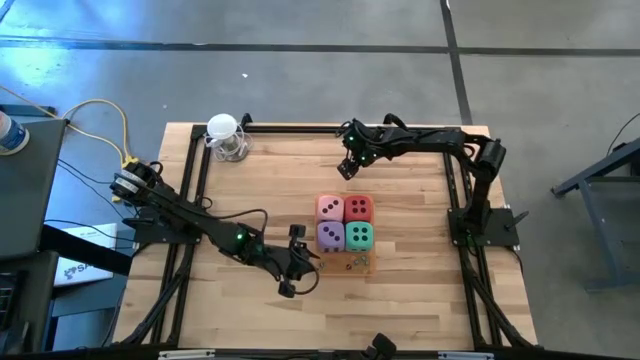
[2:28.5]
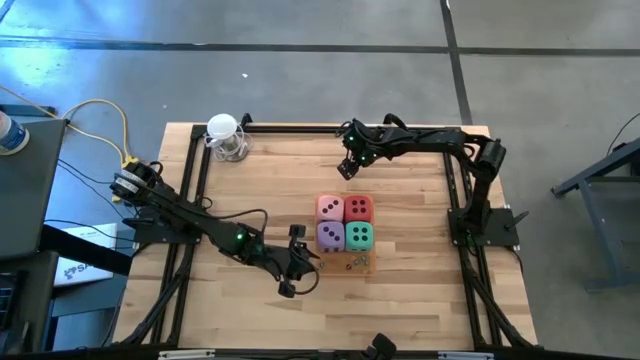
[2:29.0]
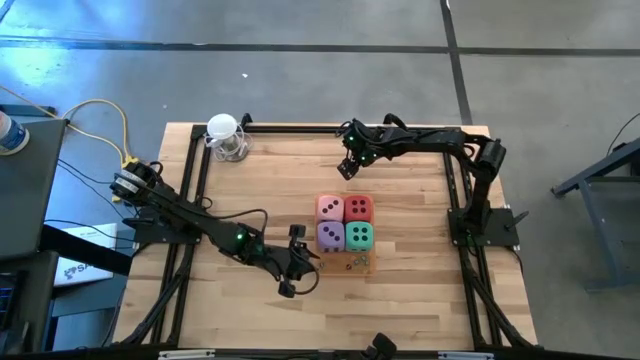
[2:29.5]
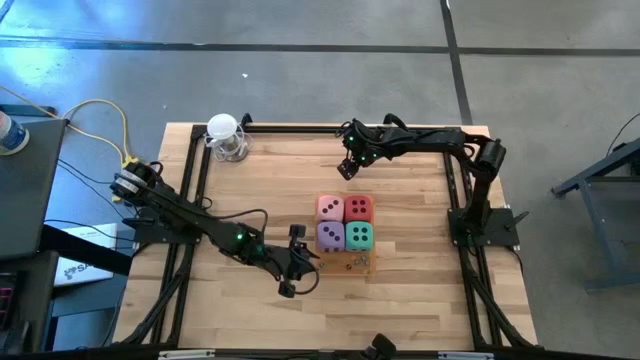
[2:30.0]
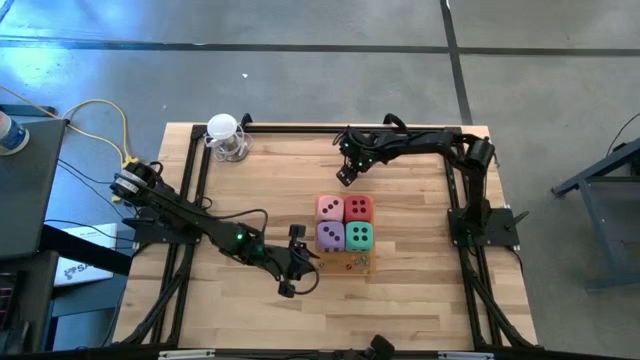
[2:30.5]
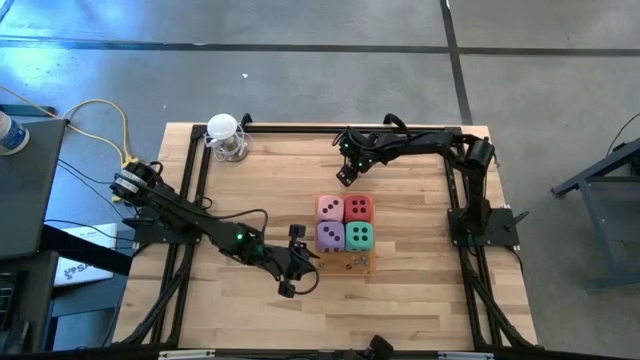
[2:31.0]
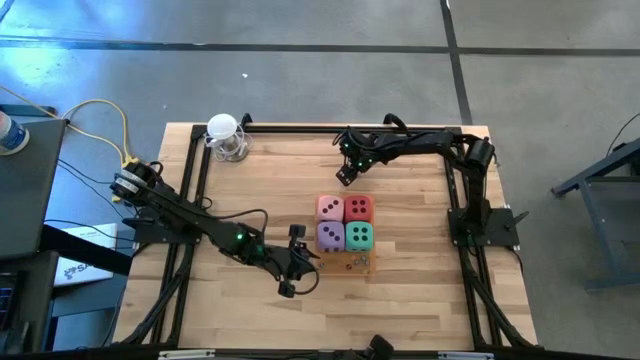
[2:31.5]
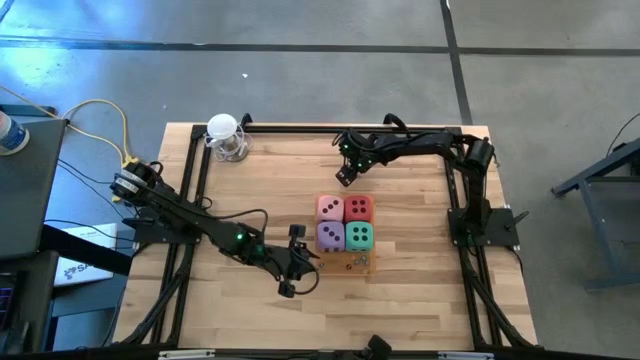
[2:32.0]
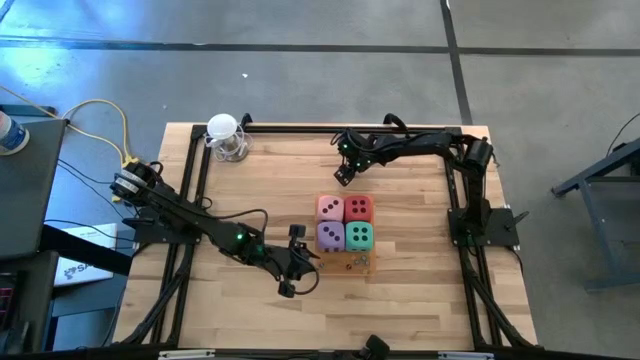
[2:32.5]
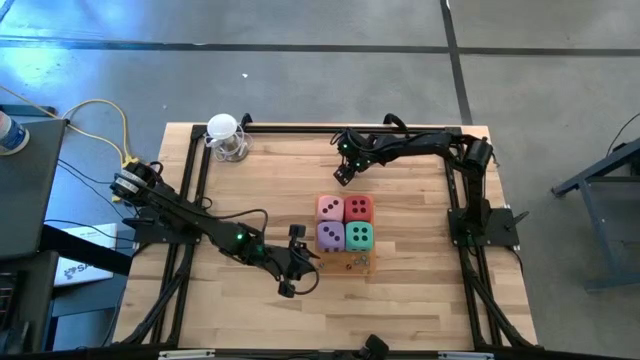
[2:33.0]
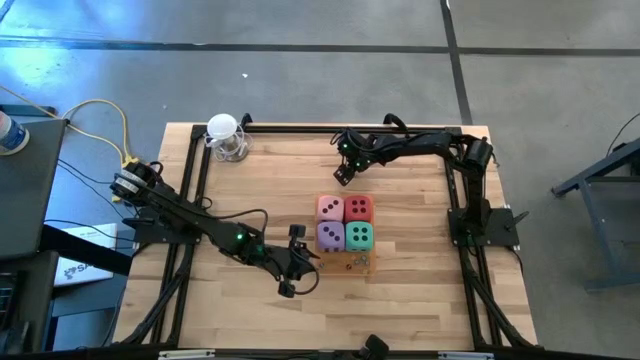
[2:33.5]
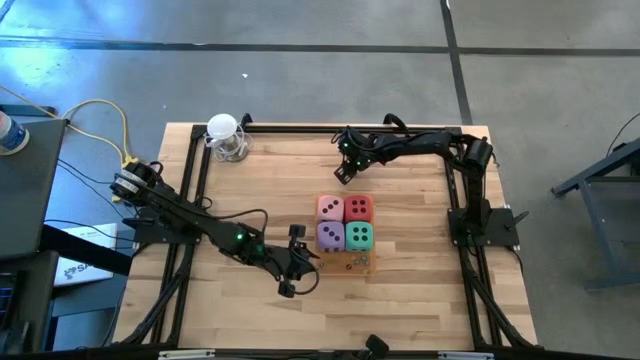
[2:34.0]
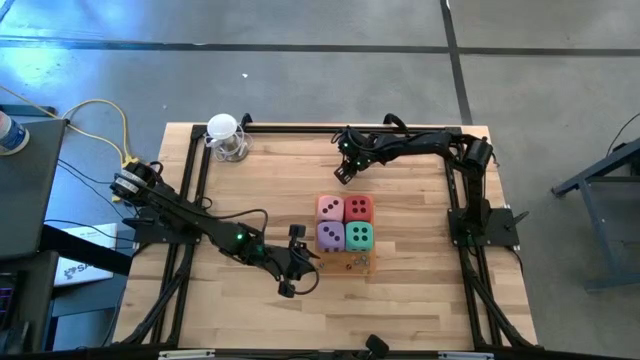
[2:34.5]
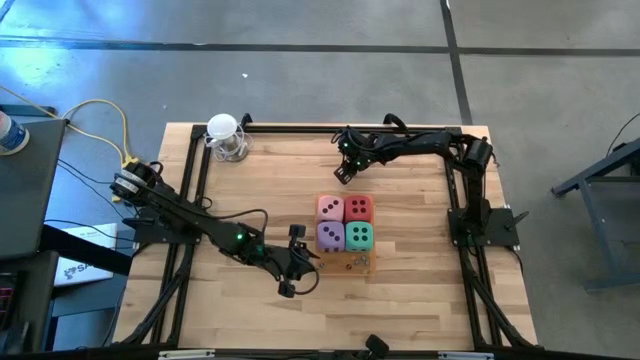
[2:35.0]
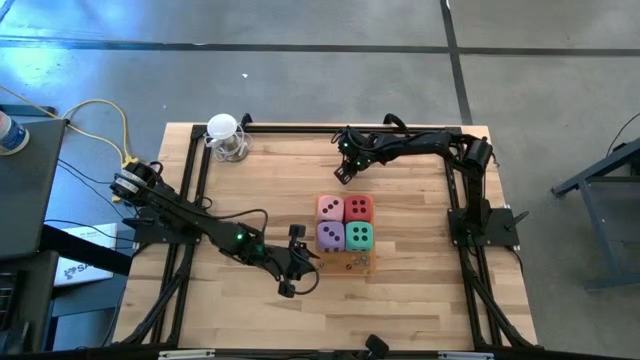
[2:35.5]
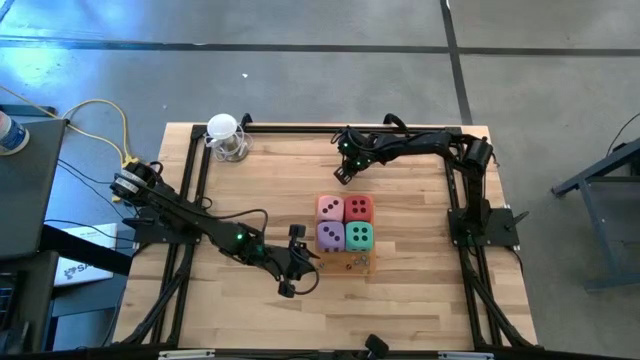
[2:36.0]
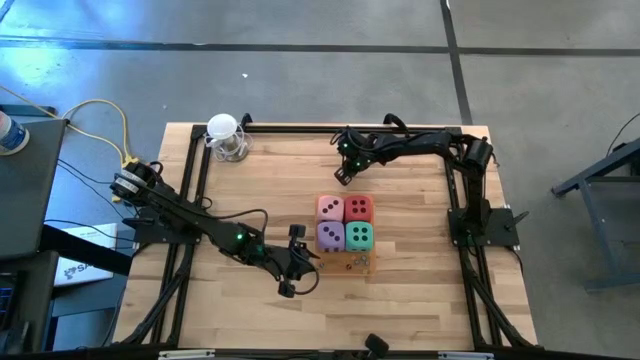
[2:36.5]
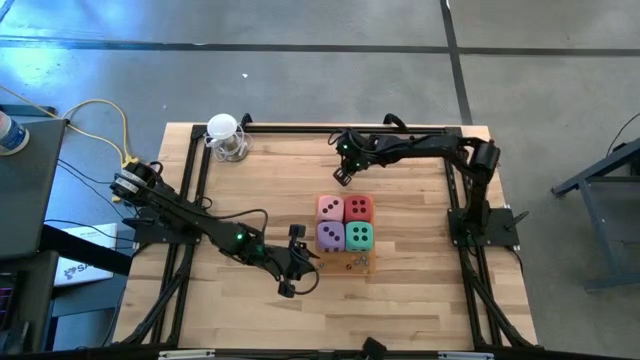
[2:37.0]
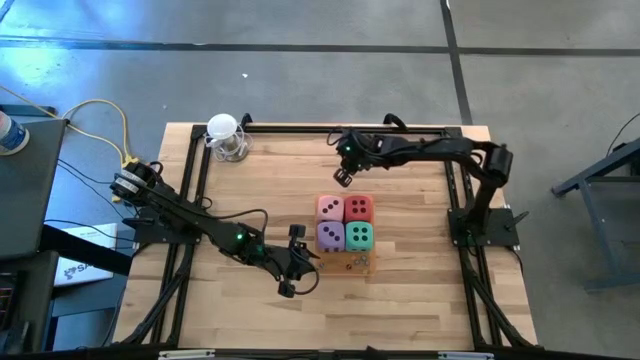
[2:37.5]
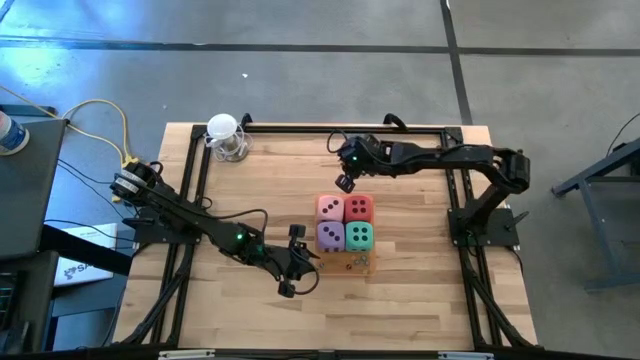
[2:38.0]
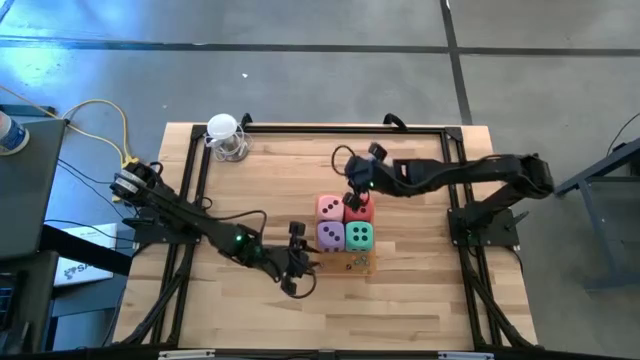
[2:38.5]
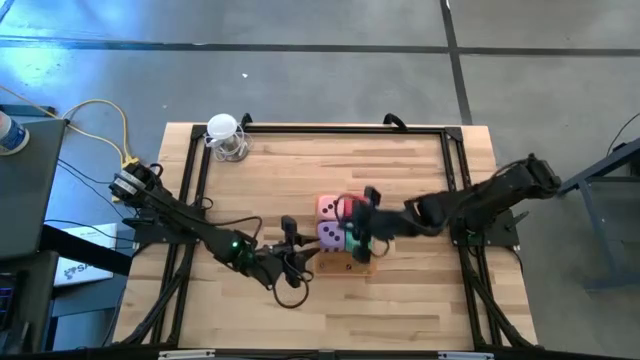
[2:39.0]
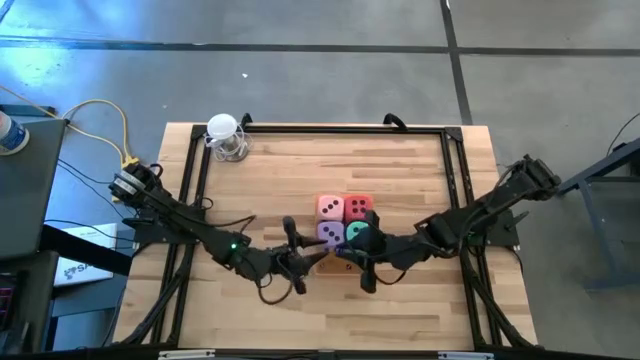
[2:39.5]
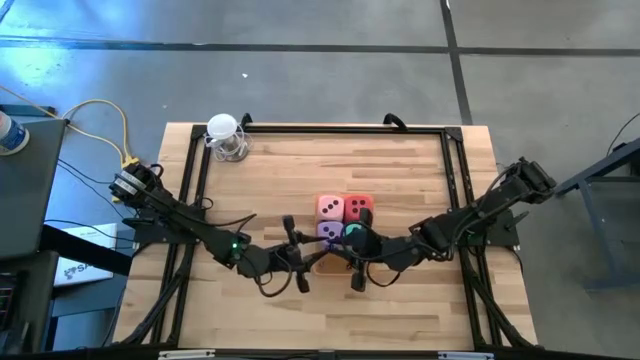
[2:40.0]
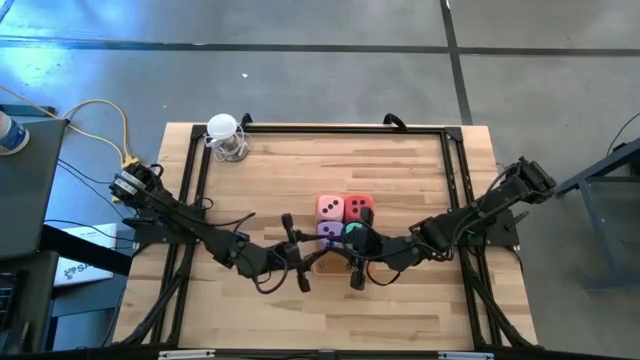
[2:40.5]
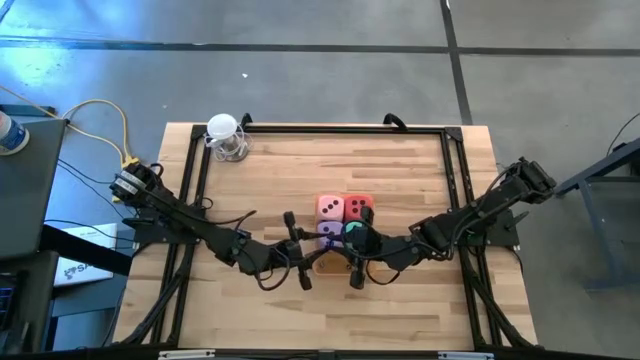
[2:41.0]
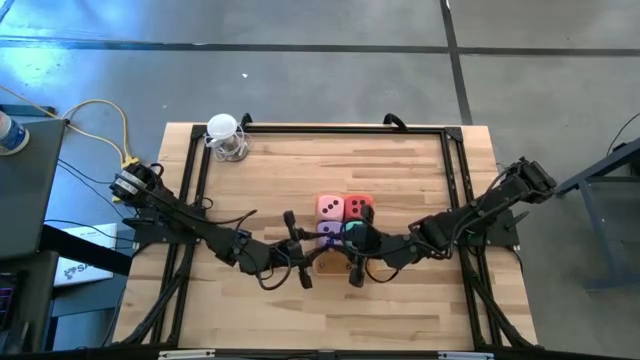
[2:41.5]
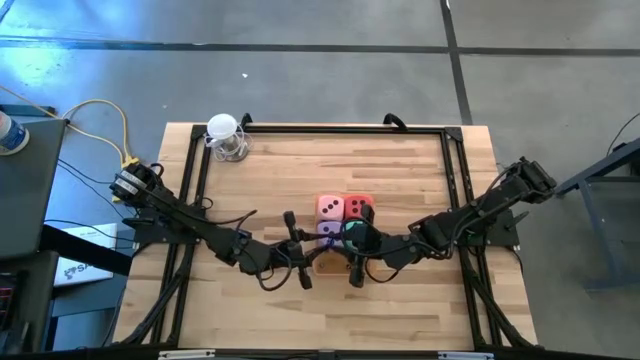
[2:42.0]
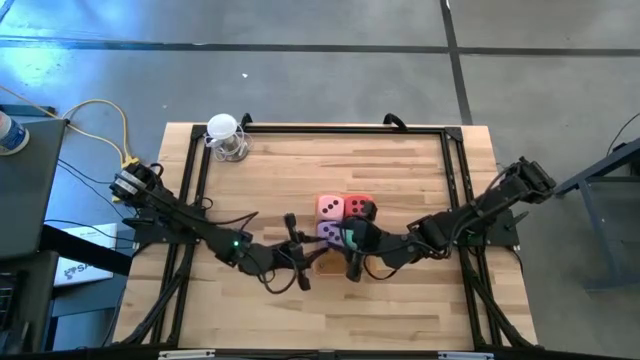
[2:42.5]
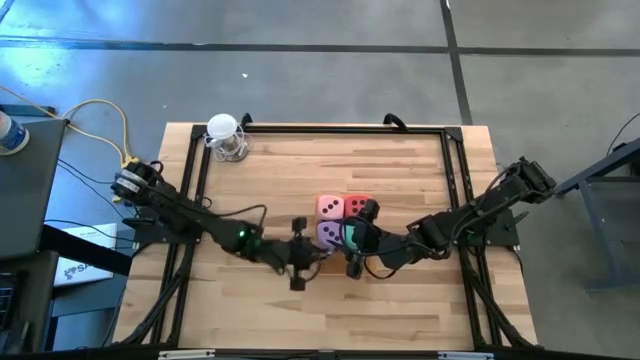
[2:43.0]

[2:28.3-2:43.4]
Task: Pick & Place Dice
Put the small dark blue die into the orange bin

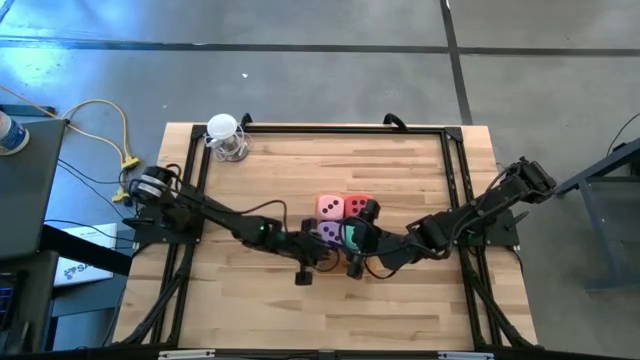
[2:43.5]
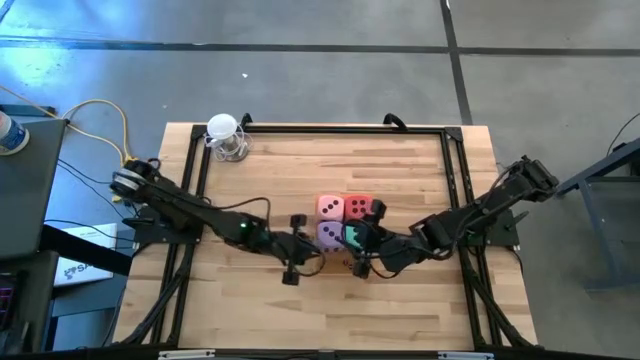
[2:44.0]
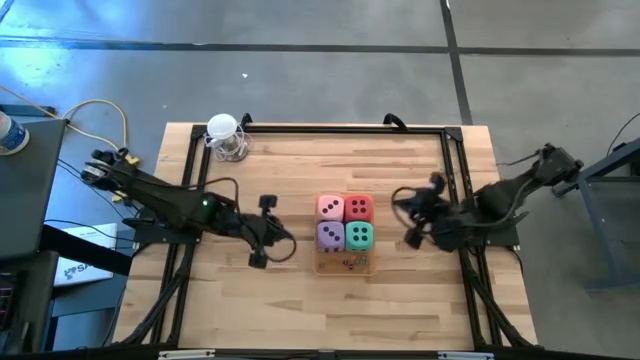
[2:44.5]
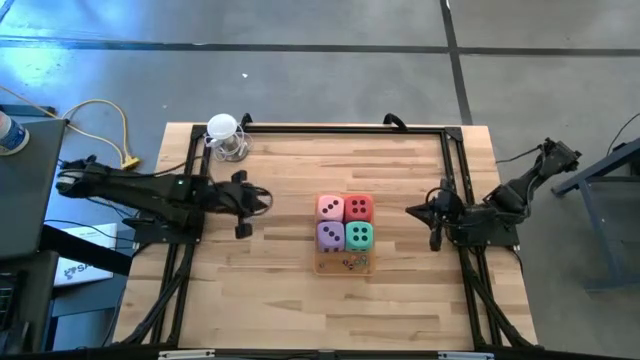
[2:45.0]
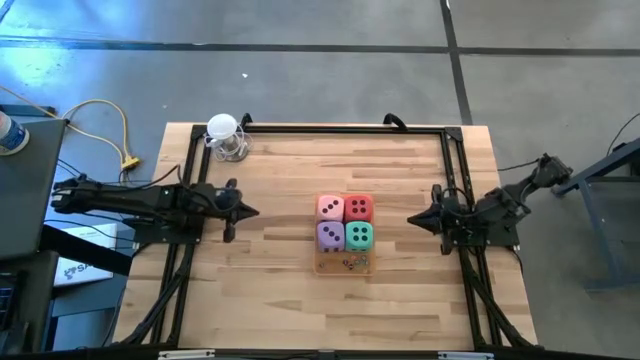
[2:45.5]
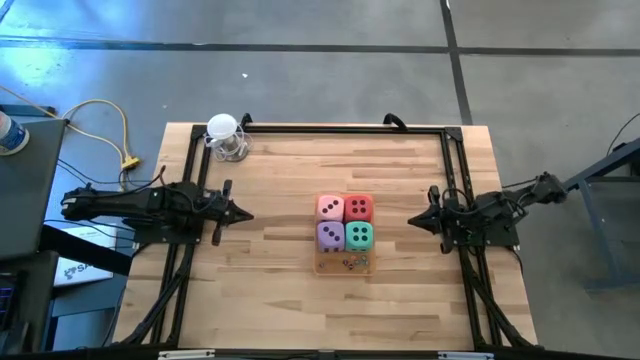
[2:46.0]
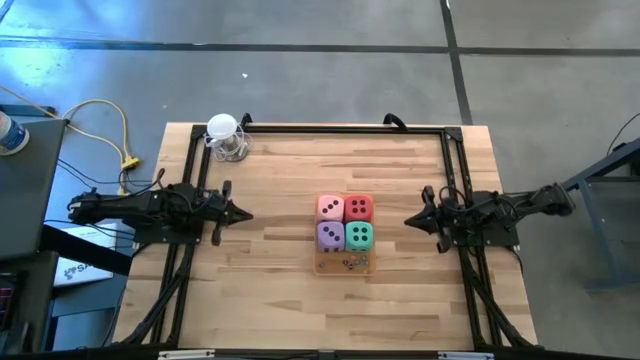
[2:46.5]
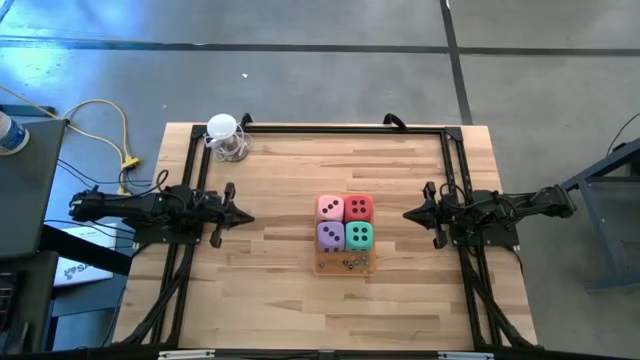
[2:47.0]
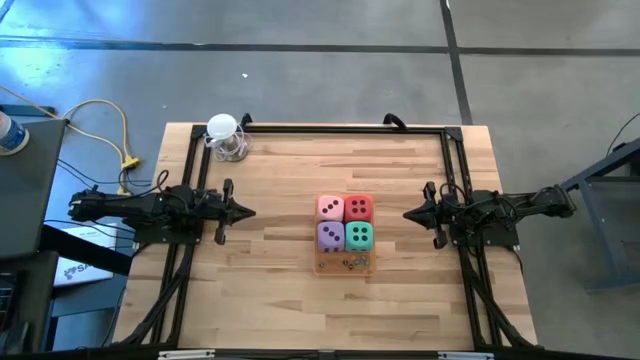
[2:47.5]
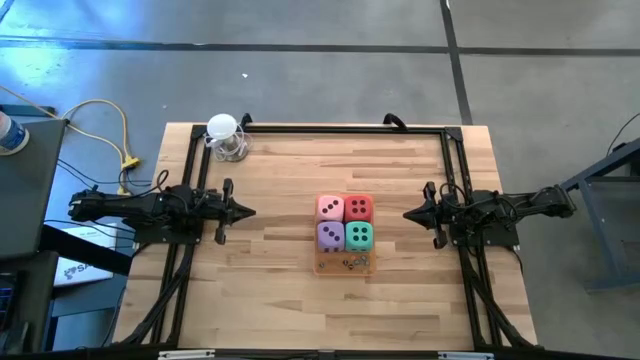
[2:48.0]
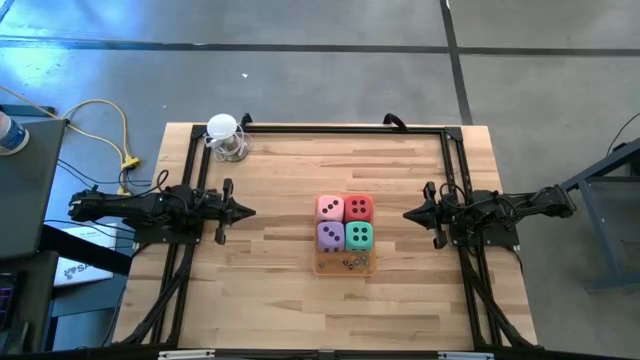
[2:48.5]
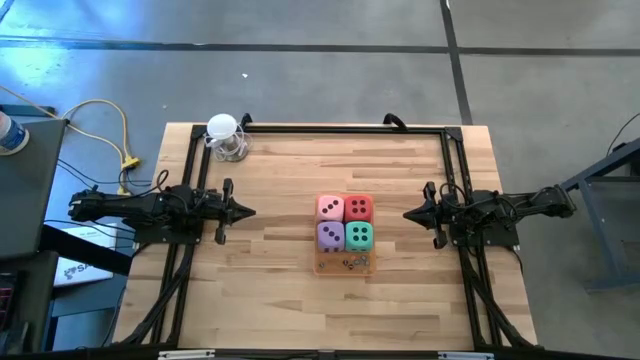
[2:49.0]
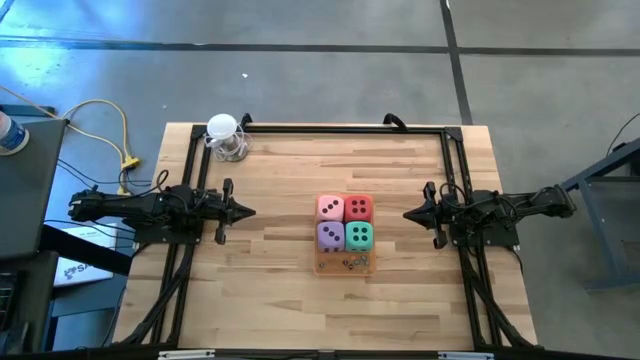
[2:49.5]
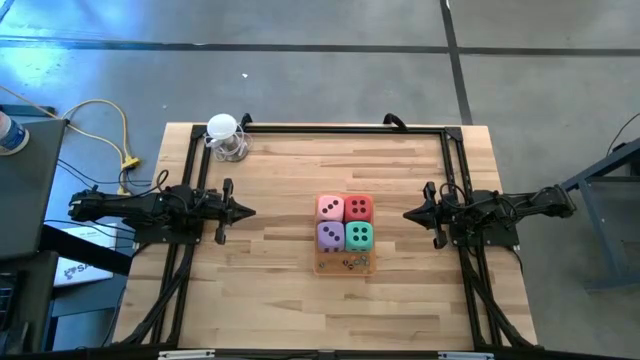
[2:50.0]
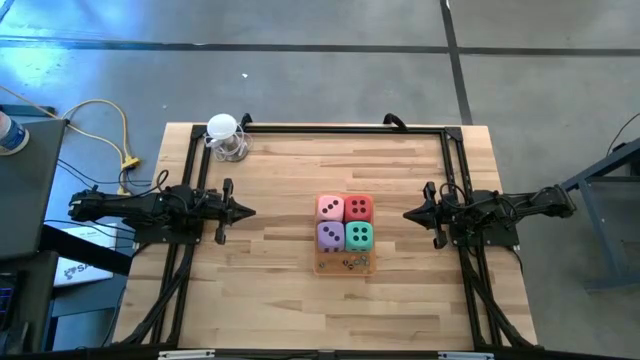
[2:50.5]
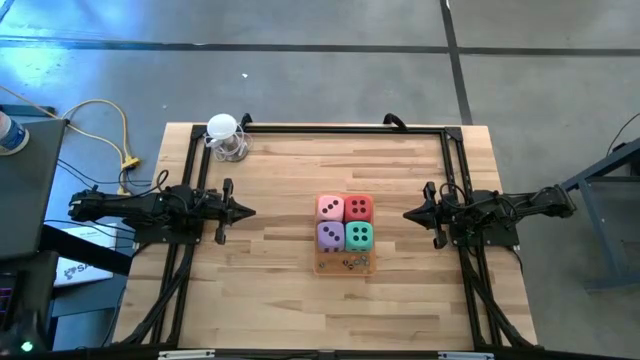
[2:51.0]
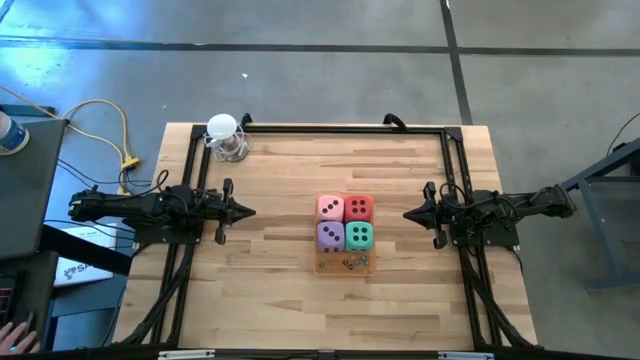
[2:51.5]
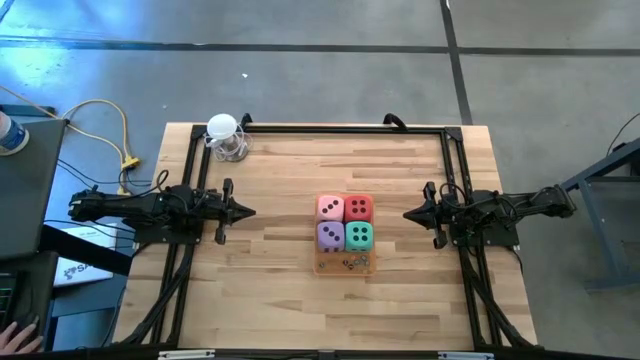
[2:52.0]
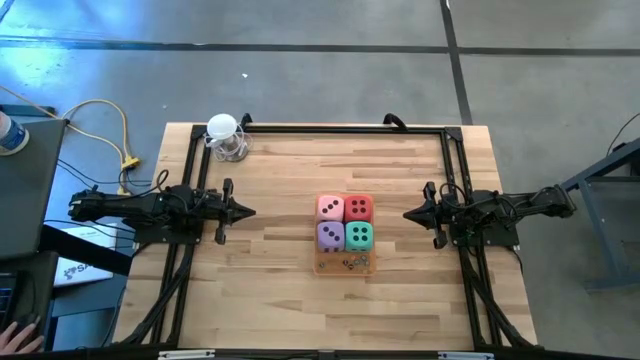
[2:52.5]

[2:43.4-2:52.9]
Return to Home Position
